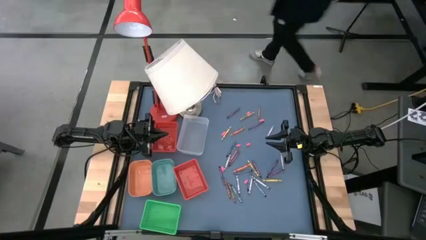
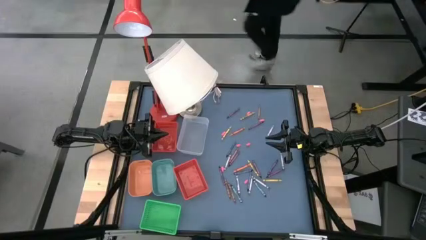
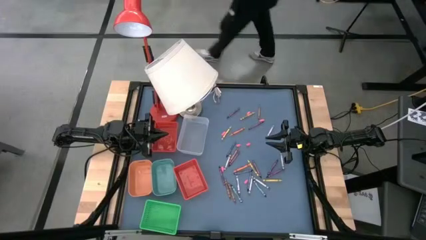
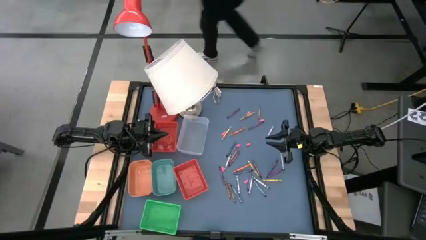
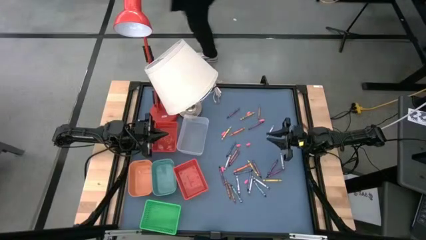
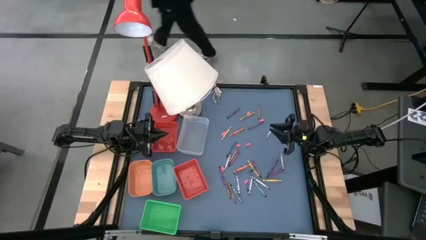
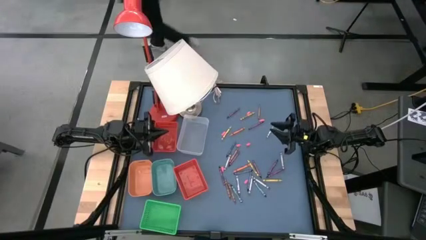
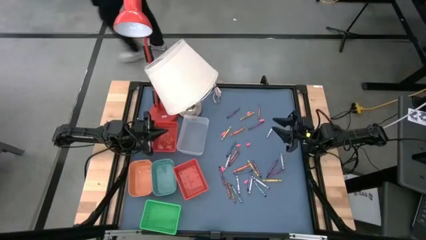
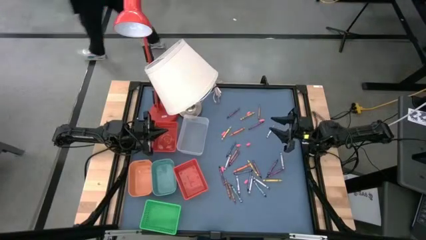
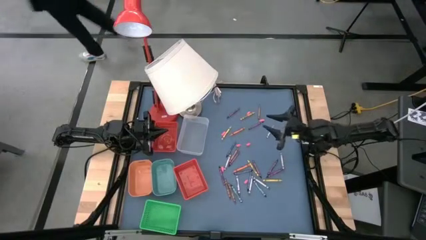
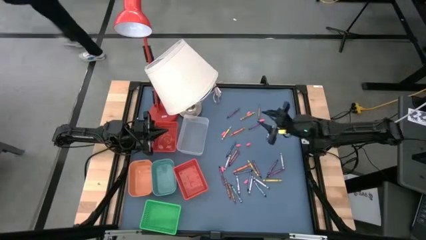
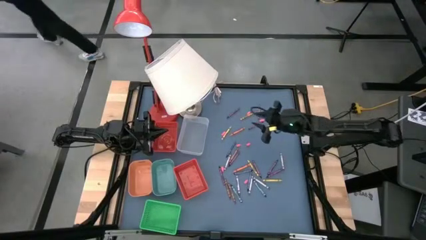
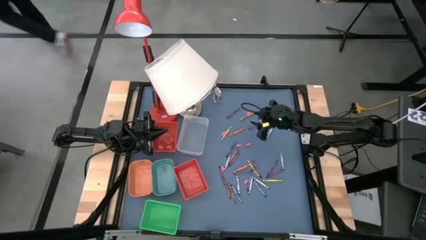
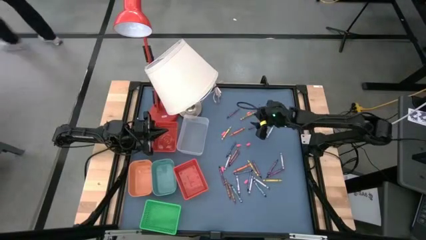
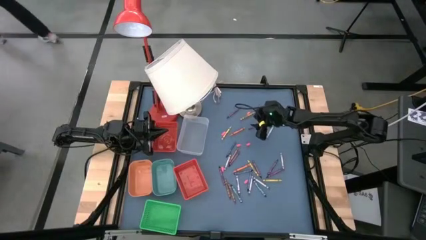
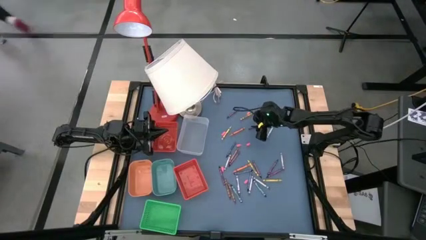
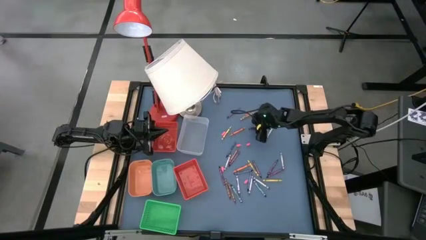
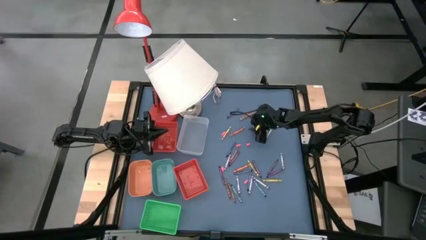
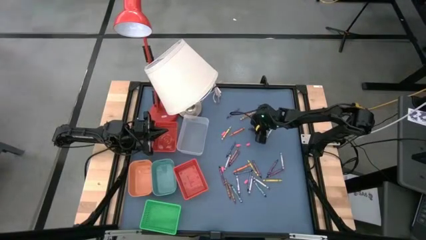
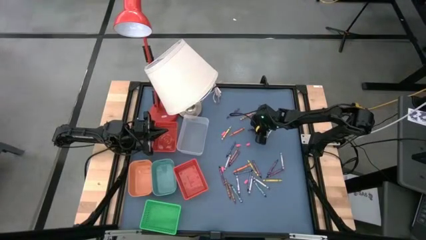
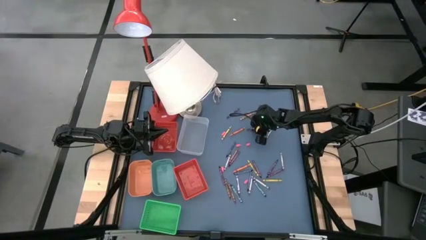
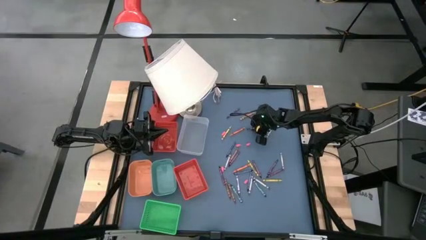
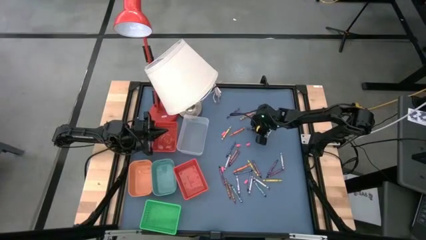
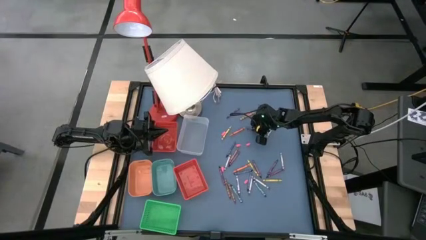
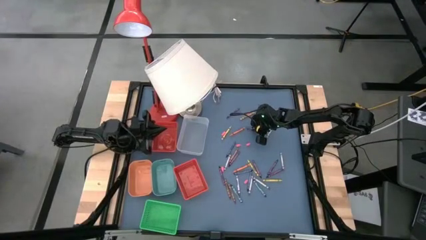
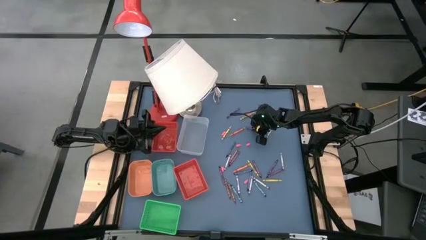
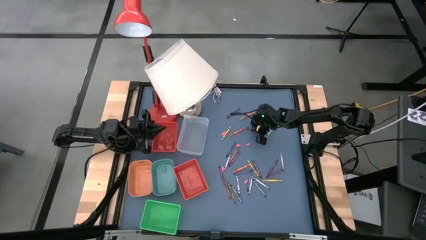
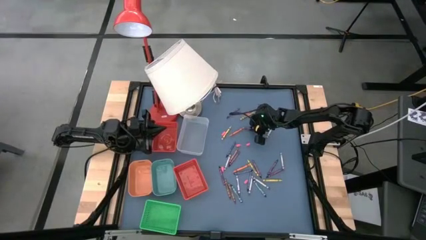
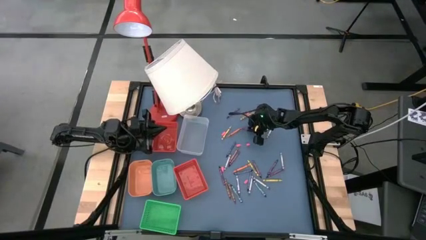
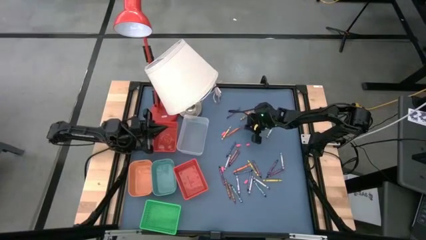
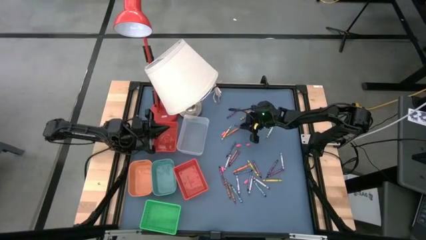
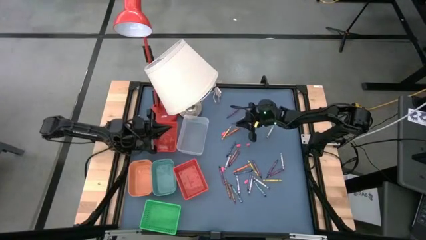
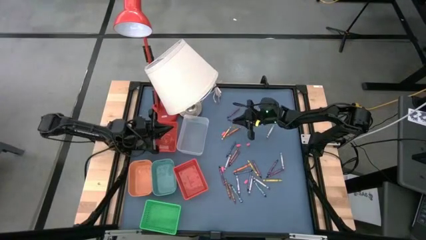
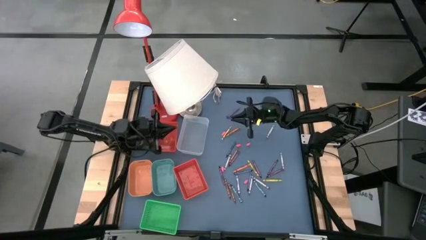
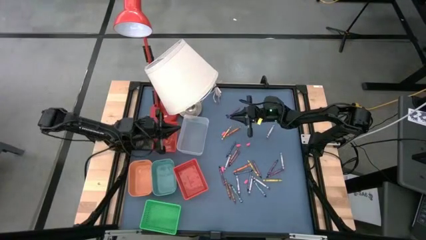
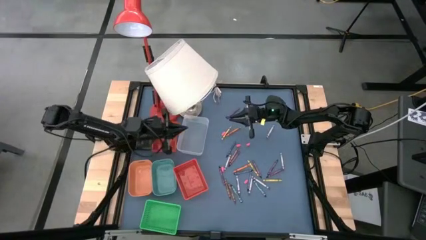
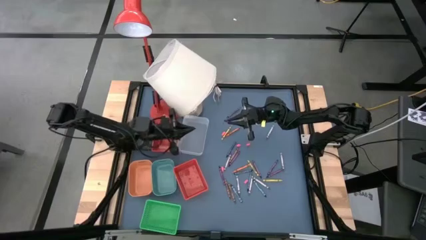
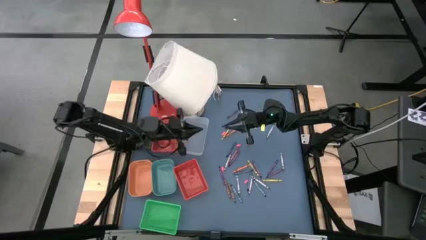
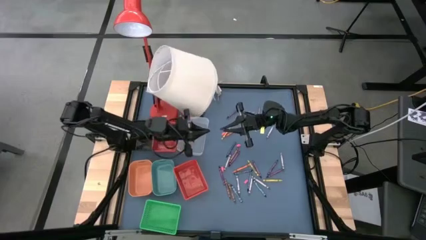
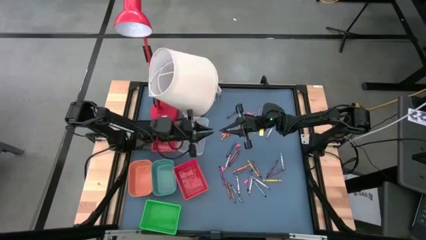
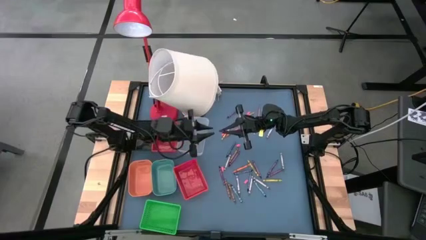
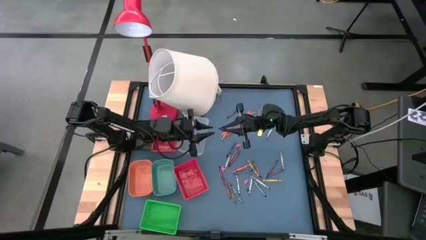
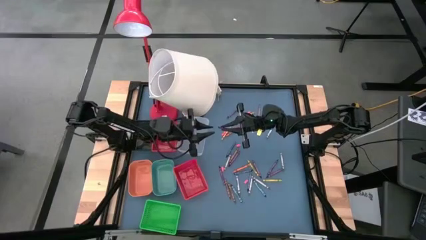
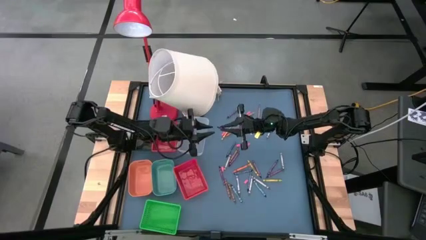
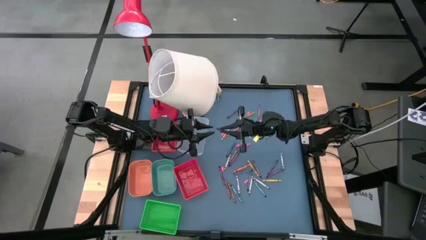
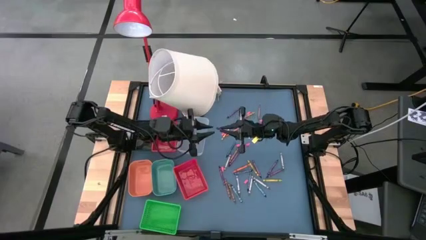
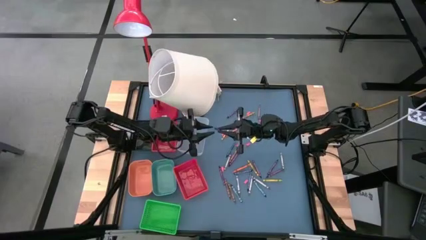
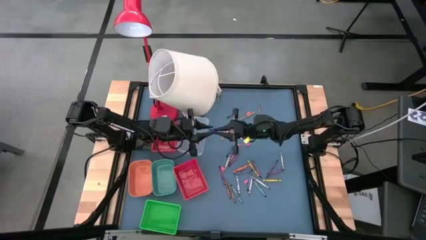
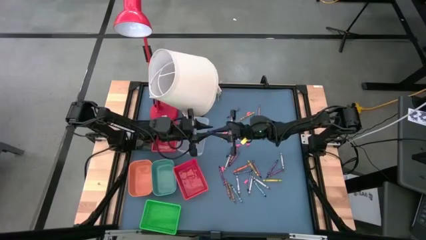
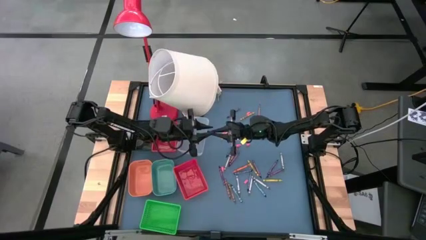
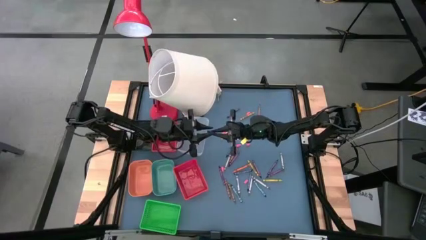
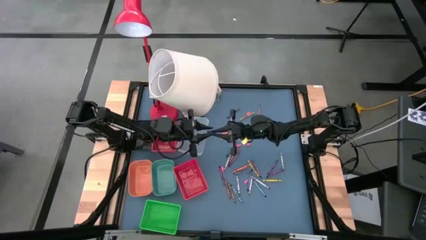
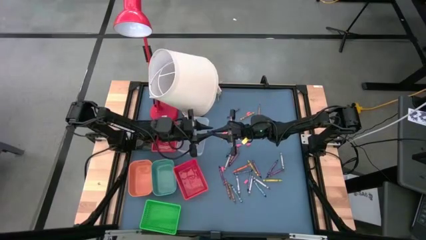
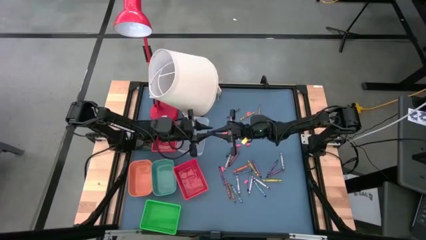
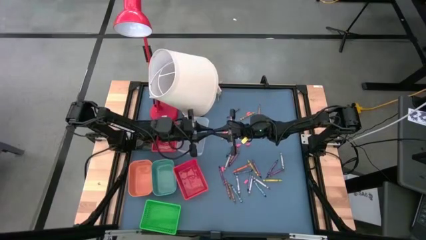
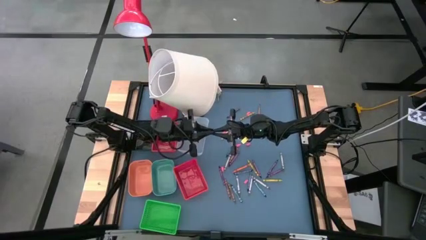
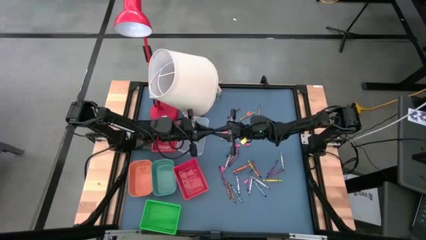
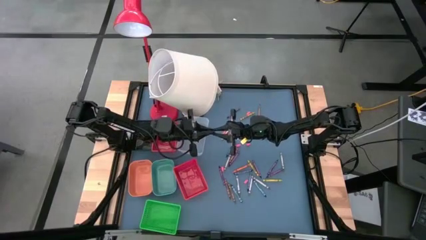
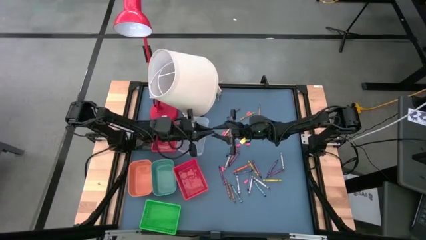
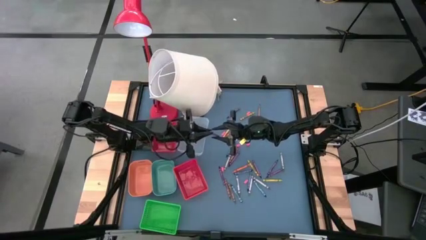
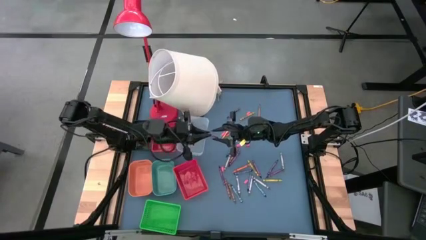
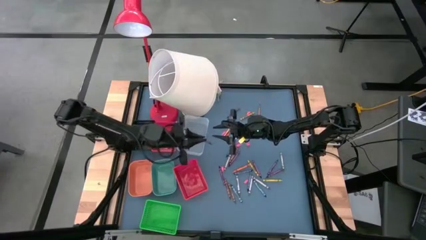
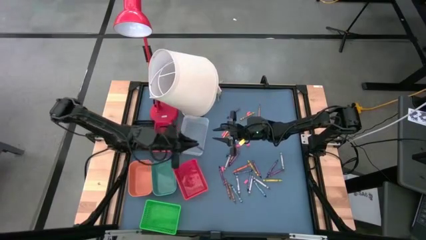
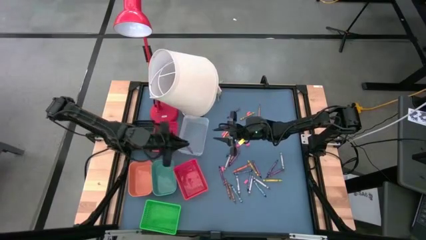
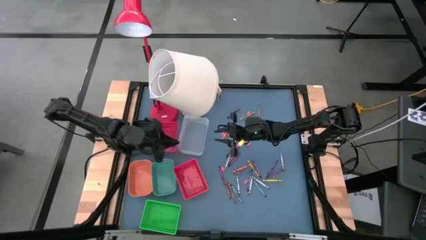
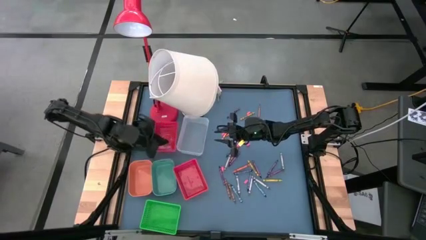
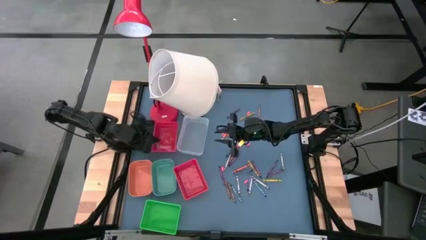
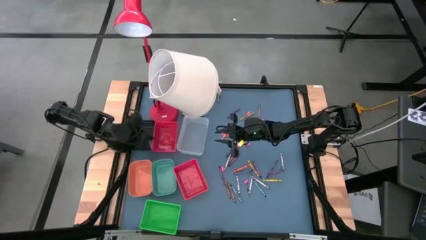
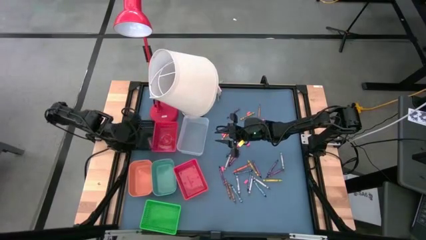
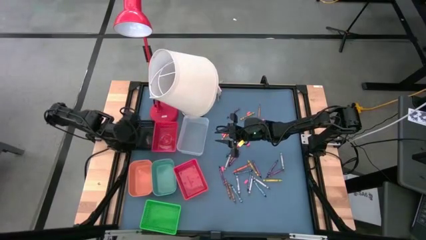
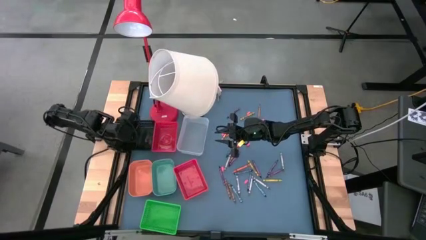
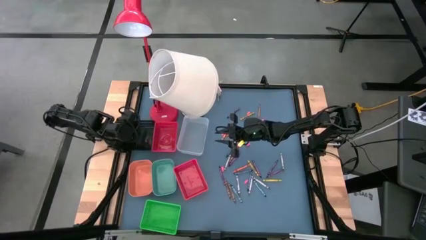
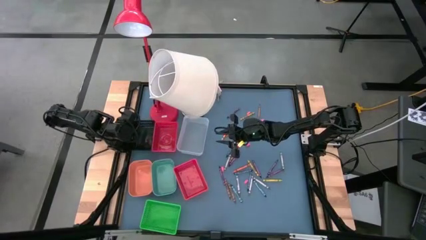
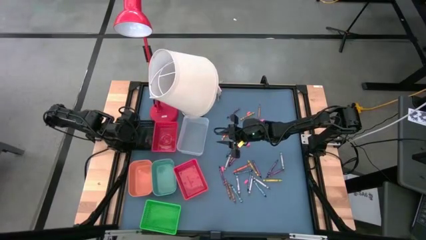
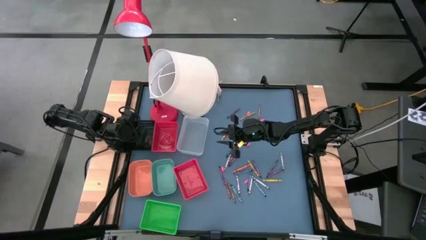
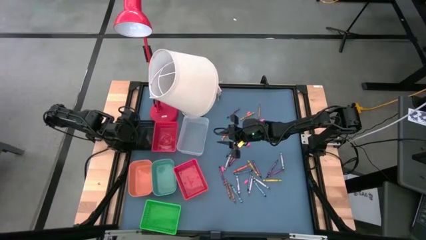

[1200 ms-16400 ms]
Task: Sort crayons
Put the violet crayon into the black bin
